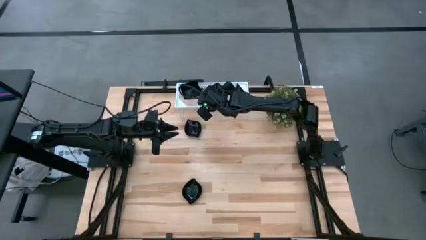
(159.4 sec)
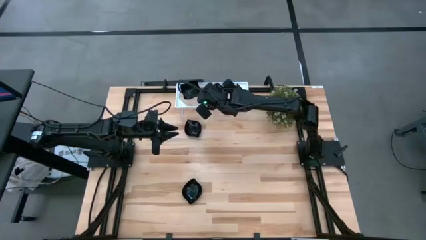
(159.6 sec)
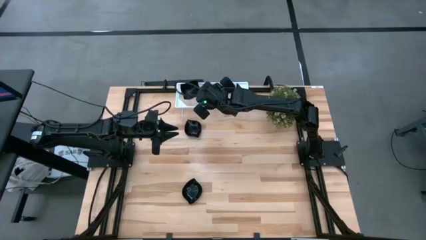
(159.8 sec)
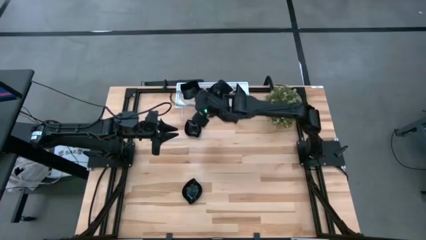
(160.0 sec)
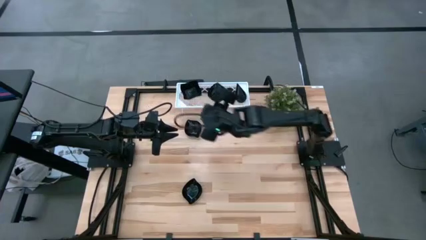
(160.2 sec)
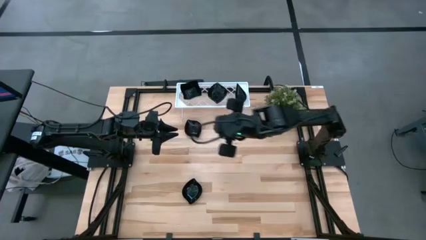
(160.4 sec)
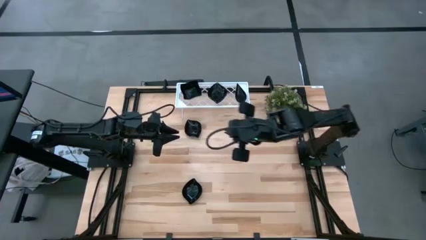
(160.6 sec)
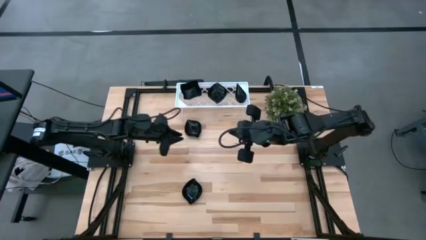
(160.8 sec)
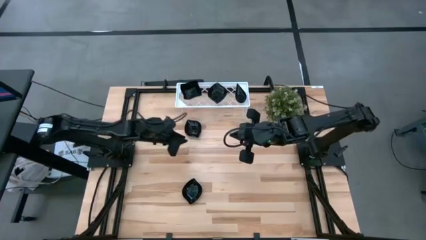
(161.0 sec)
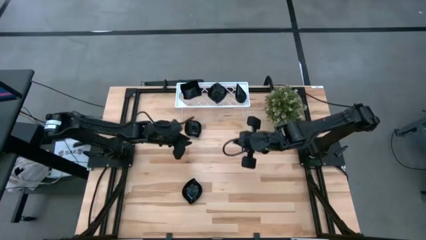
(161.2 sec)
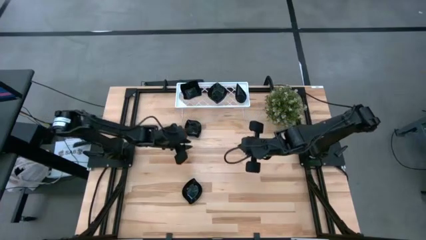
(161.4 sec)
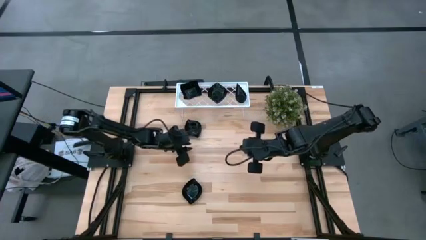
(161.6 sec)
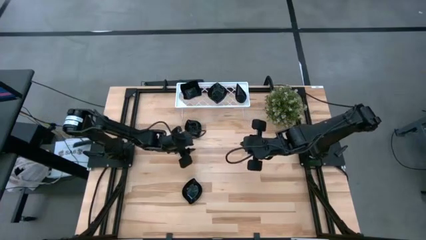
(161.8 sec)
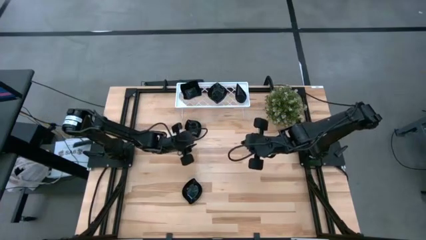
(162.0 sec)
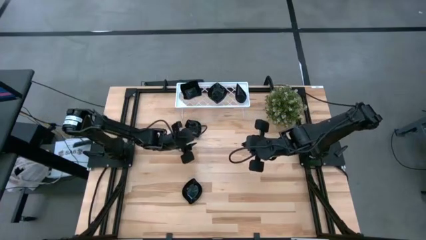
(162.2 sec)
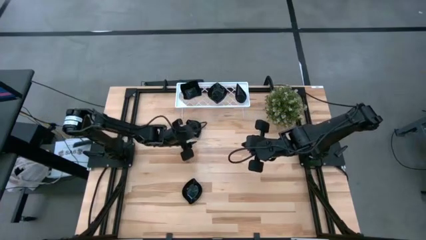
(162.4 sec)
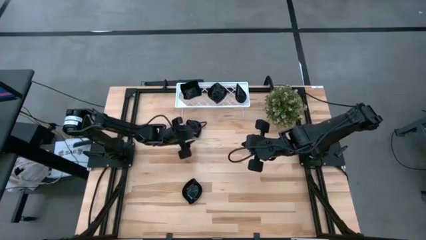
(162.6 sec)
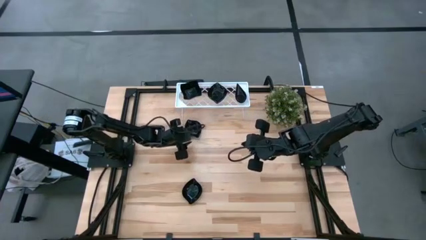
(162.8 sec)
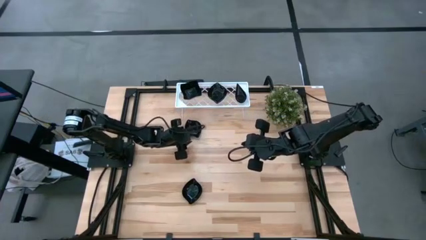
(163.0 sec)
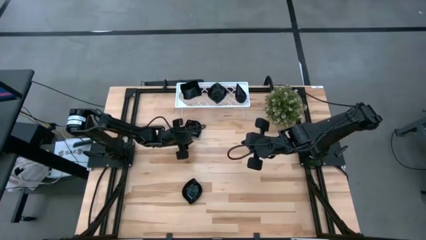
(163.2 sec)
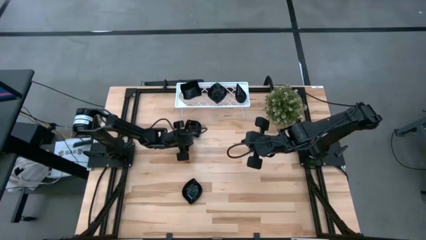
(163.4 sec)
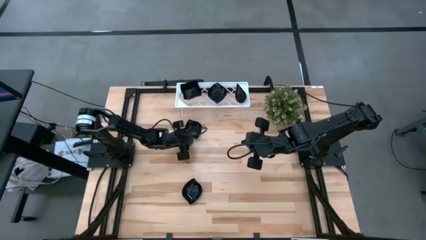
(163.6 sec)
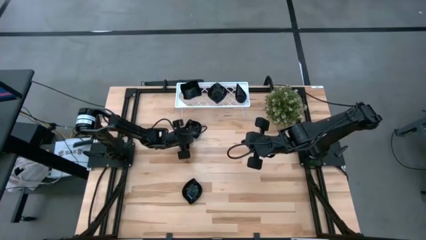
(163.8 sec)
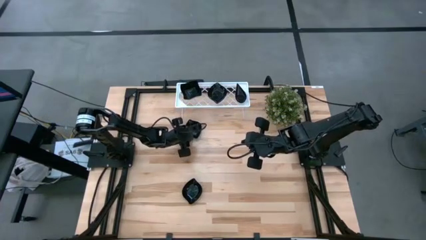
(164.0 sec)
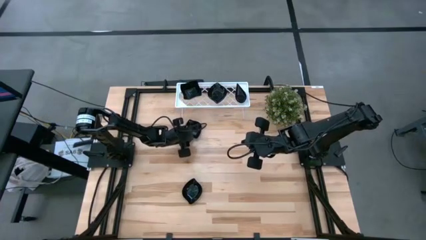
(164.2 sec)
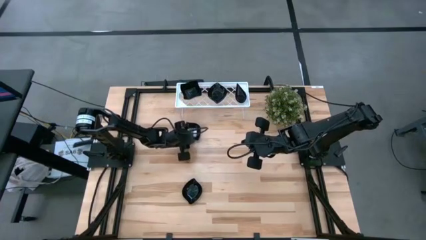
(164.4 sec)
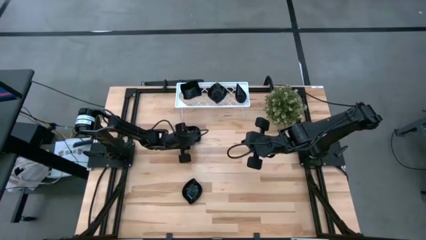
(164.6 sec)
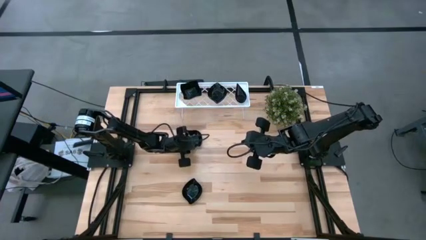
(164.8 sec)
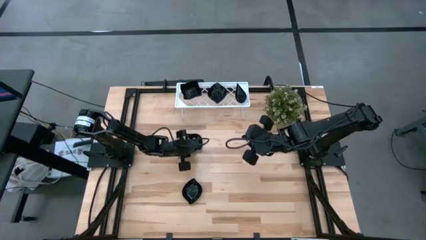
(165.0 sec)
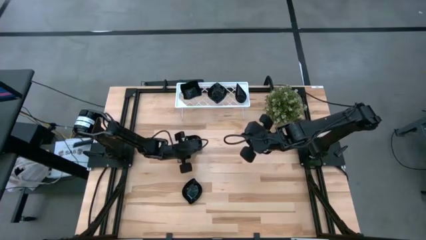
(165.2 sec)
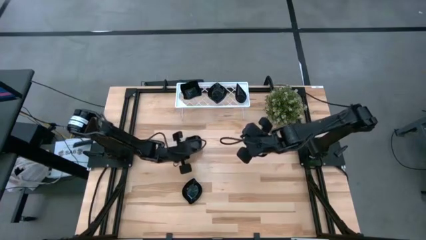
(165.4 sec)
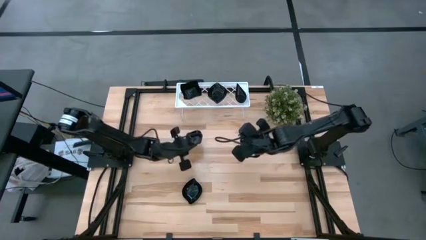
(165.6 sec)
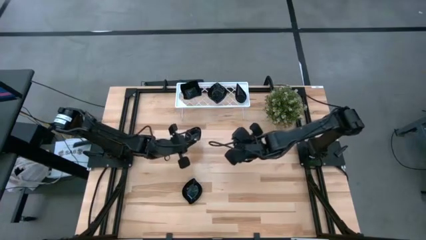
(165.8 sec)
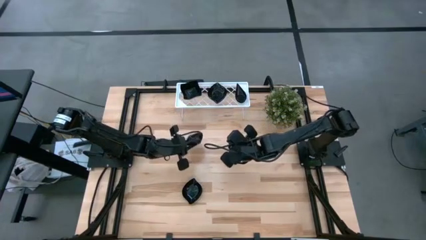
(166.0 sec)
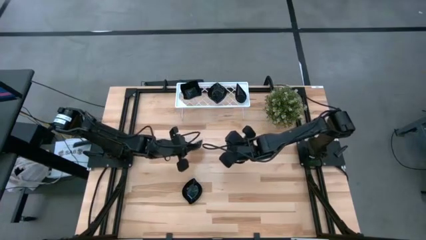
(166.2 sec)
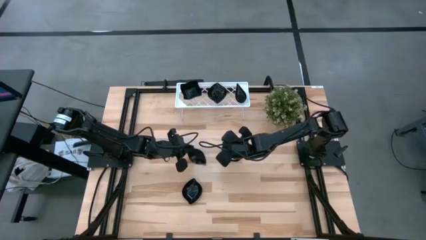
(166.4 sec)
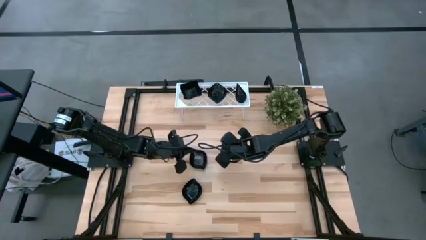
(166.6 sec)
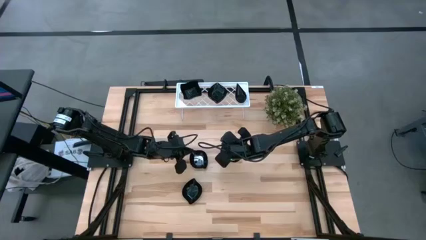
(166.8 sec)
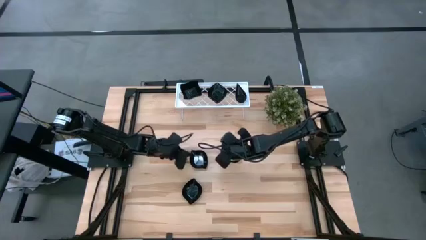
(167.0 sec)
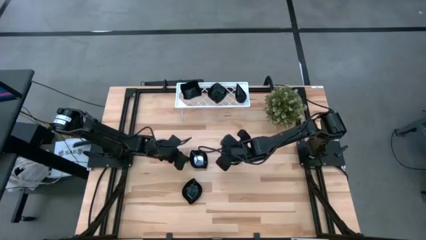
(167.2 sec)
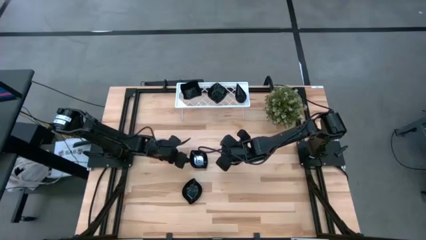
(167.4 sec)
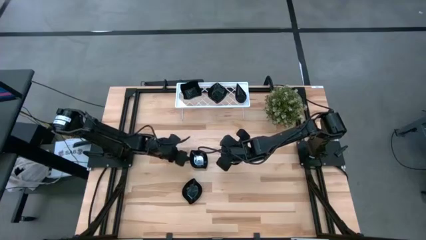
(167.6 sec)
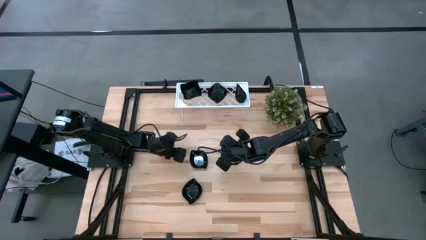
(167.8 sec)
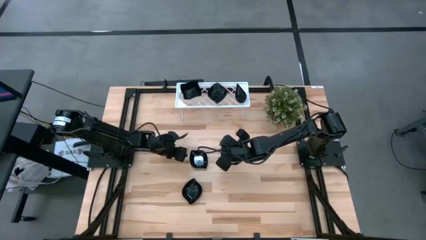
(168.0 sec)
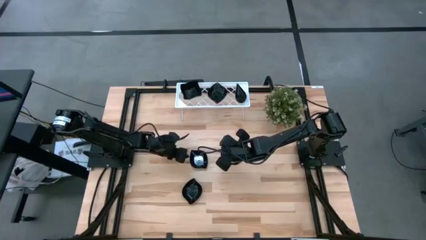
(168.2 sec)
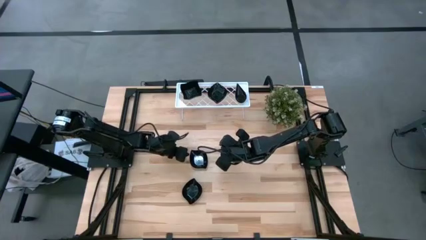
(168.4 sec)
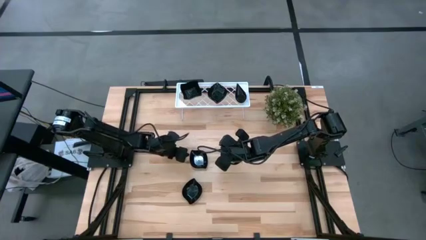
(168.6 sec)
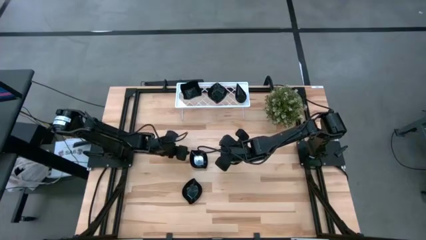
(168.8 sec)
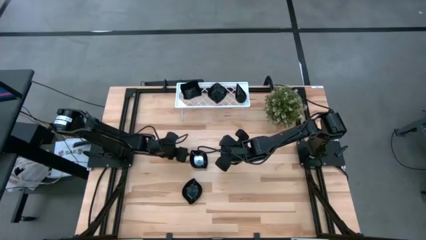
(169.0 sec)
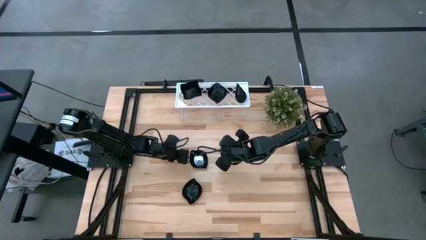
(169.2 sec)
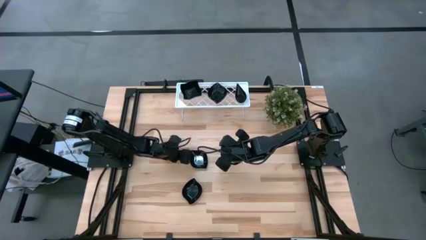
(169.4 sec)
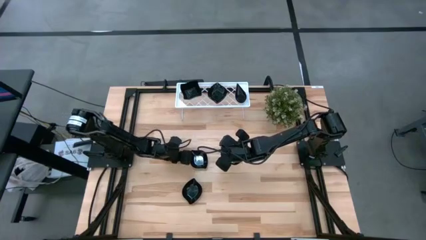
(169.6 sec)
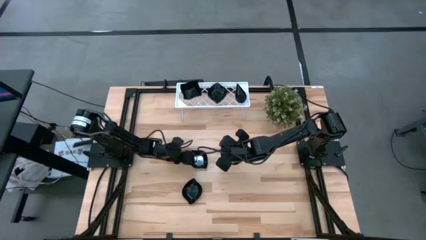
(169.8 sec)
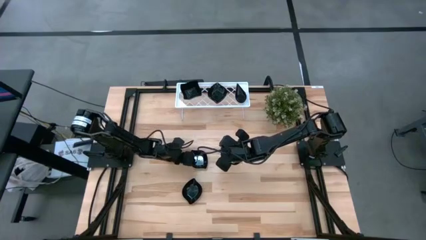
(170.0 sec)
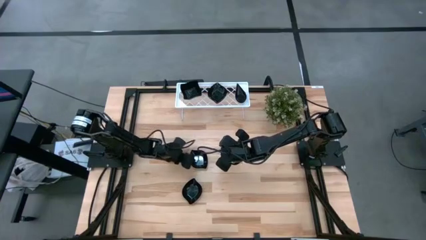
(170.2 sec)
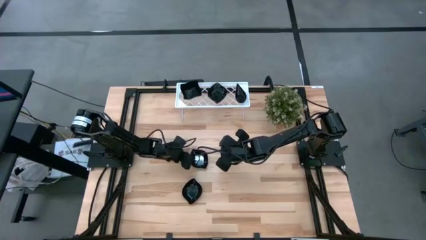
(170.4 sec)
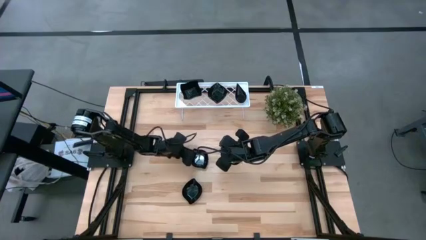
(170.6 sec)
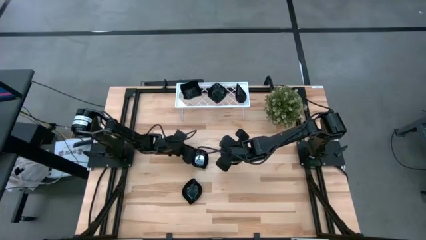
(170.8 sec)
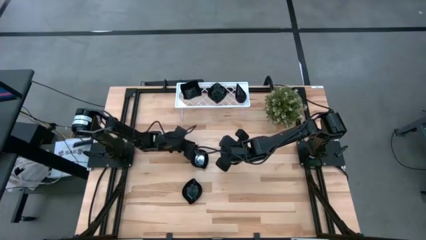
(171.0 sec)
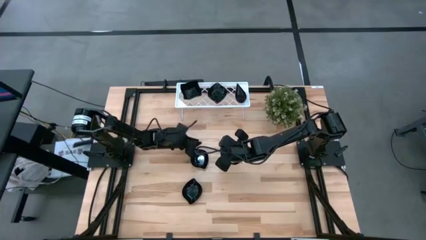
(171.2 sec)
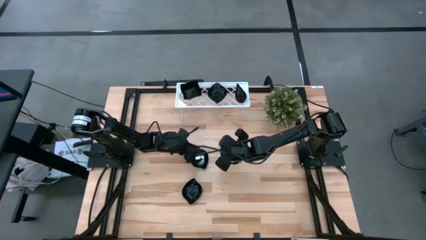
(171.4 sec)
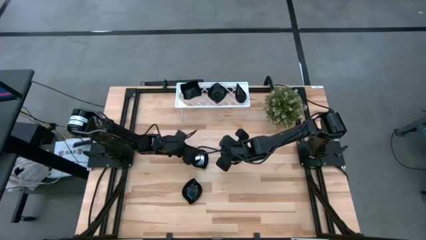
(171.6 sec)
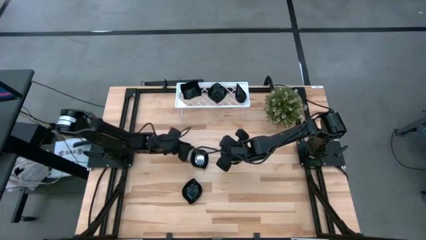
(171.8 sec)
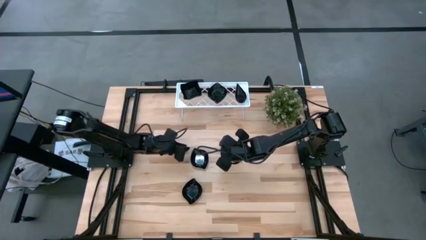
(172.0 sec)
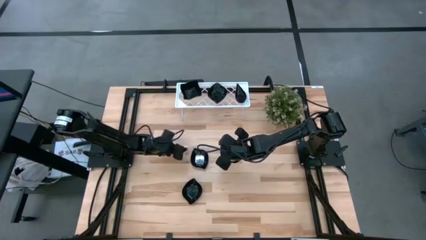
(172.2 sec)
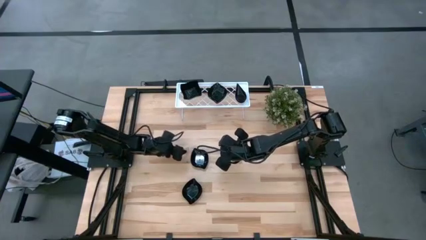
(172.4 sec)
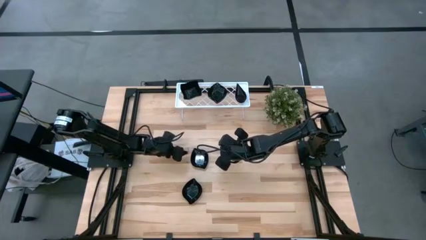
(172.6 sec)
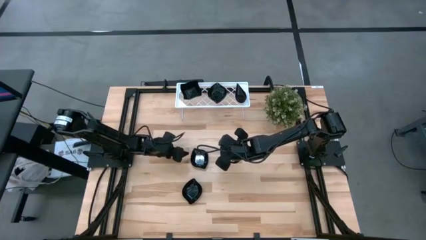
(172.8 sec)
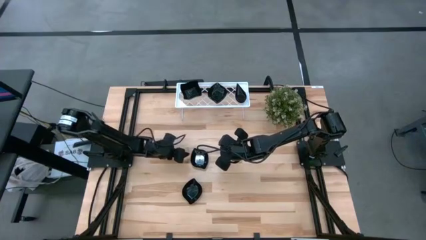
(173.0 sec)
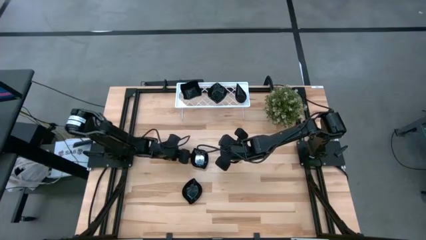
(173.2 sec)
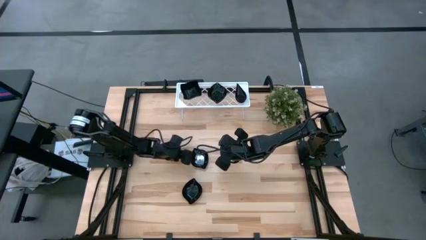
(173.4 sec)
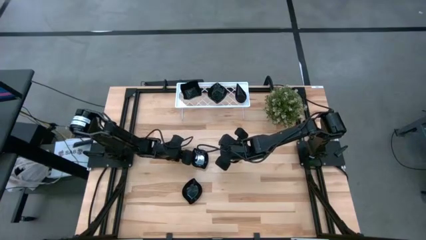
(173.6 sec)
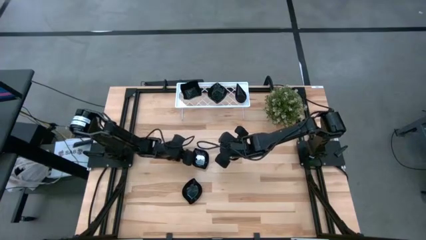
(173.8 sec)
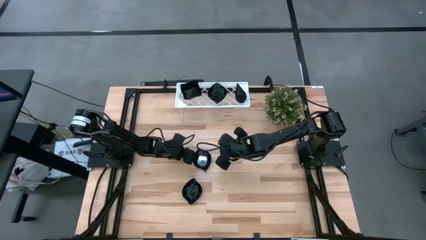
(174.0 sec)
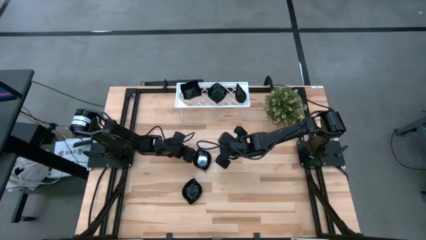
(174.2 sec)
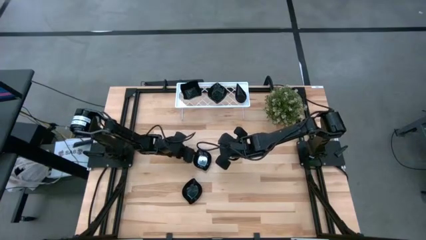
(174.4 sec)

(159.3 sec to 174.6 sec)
Task: Pick & Place Mini shaped plates
Stack the leaf-shaped plate on top of the leaf-shaped plate on the shelf
